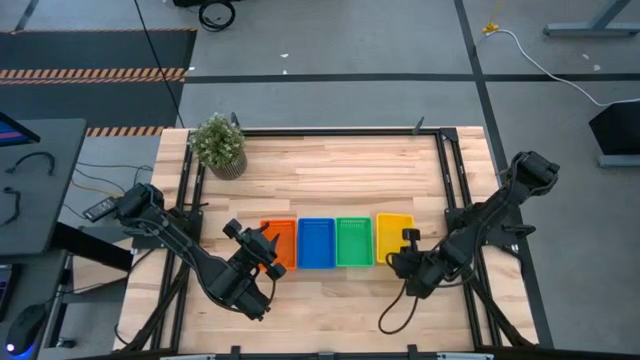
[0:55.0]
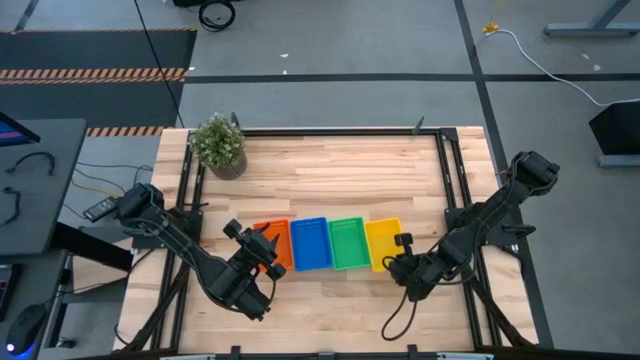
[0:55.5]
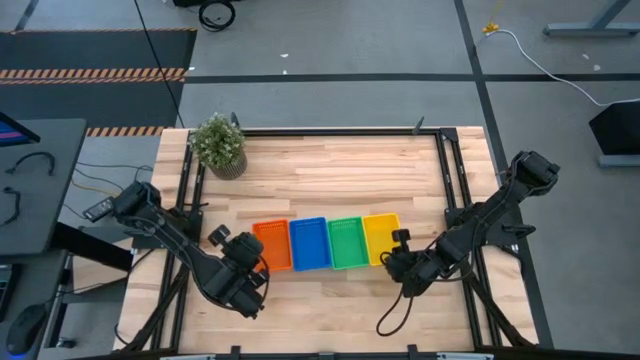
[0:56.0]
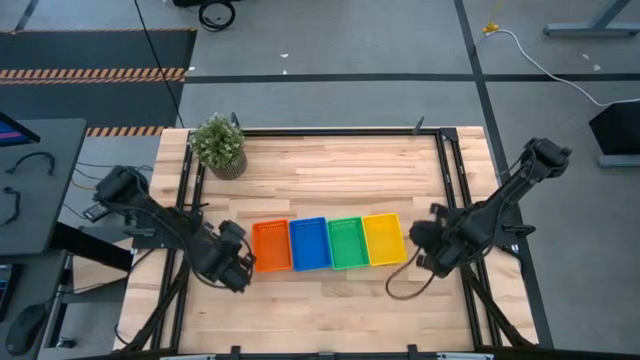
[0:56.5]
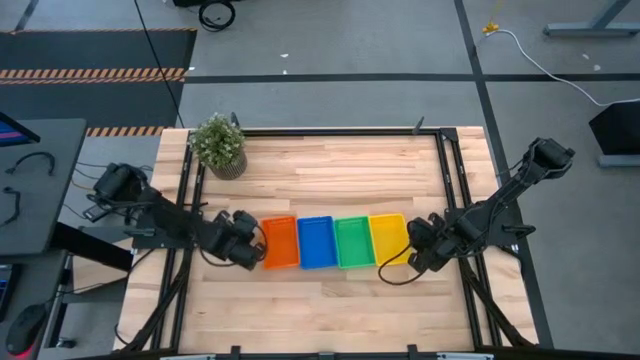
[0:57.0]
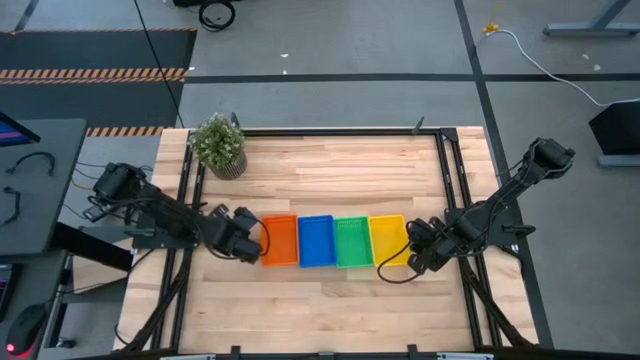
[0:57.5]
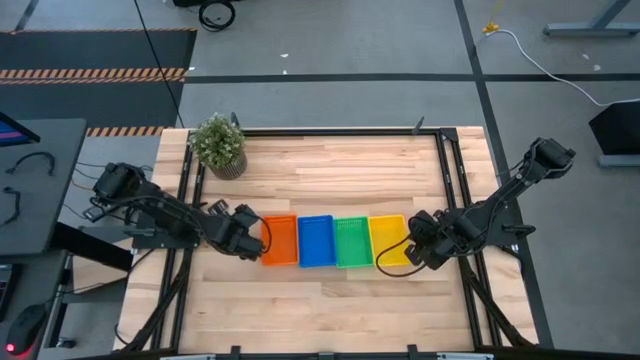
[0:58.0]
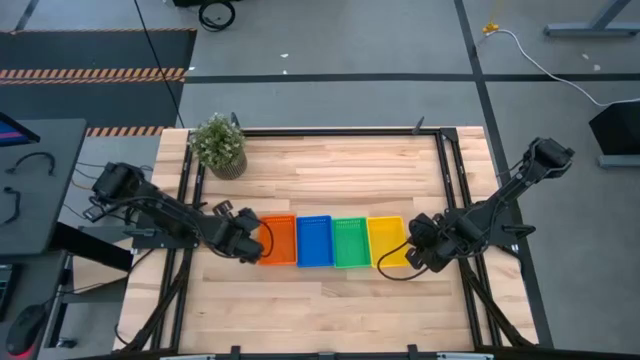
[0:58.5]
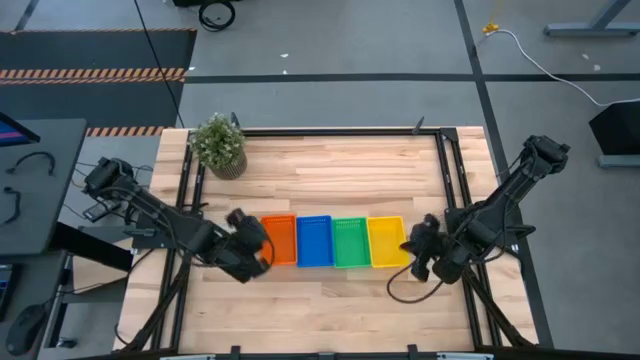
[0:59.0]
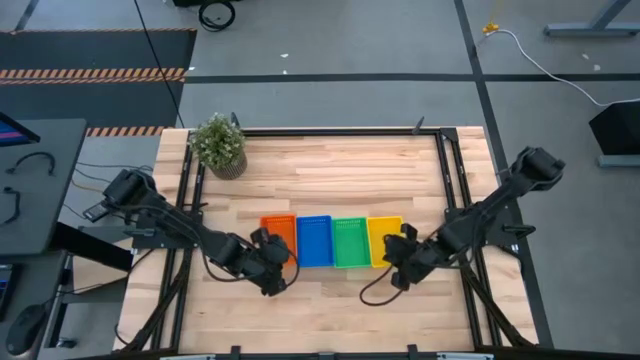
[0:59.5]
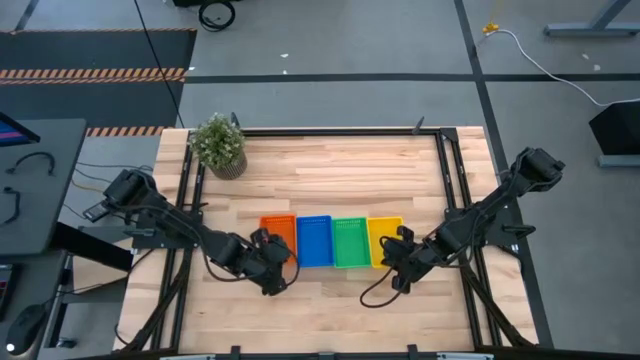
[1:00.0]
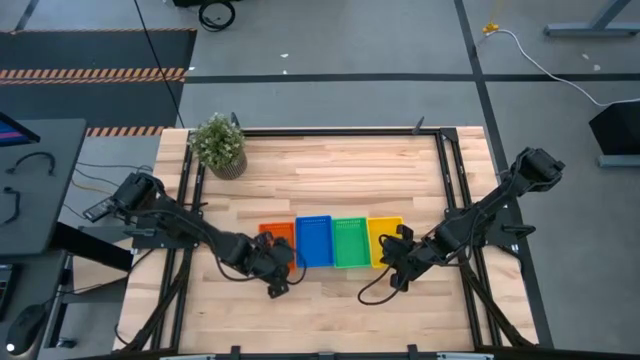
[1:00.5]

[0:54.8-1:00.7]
Adjust the bins

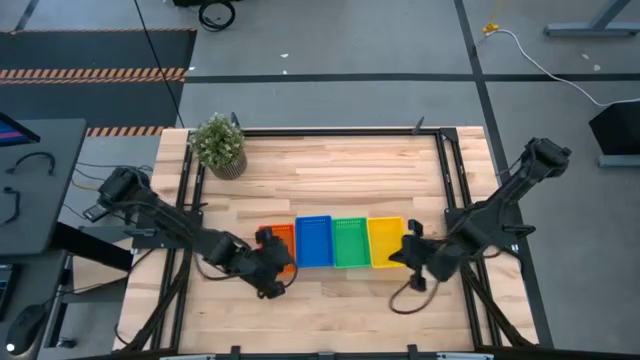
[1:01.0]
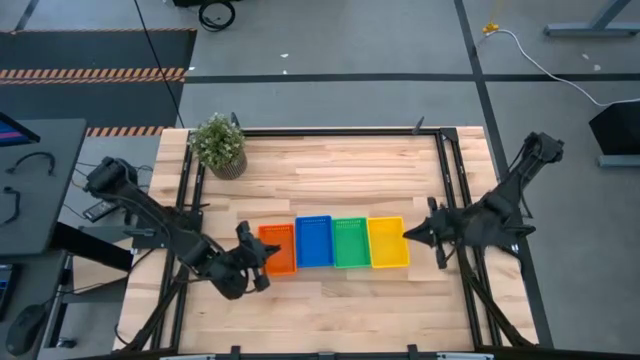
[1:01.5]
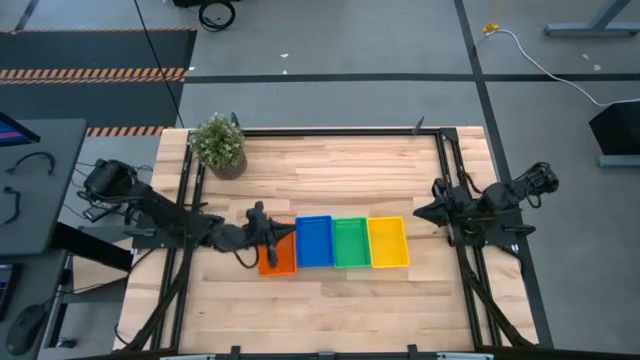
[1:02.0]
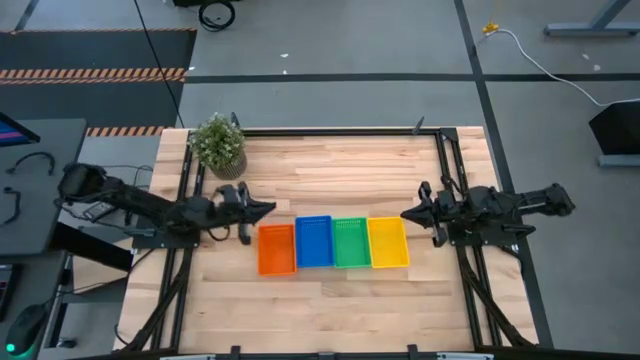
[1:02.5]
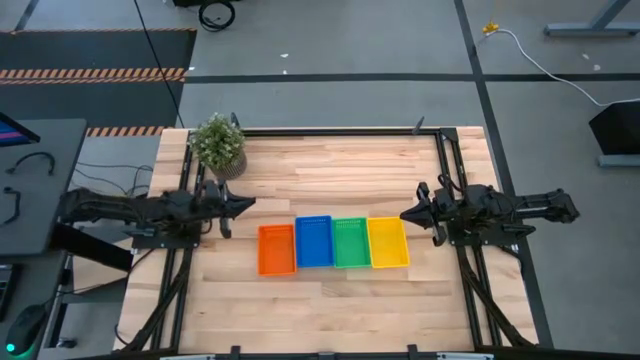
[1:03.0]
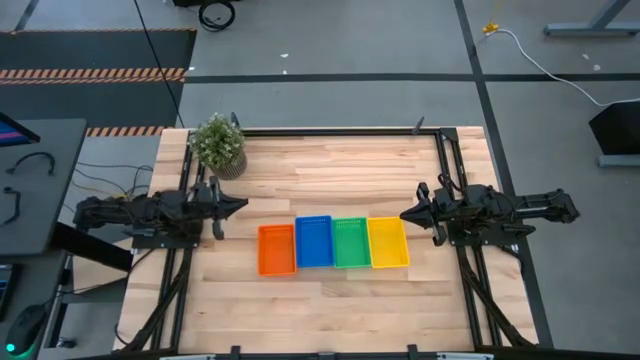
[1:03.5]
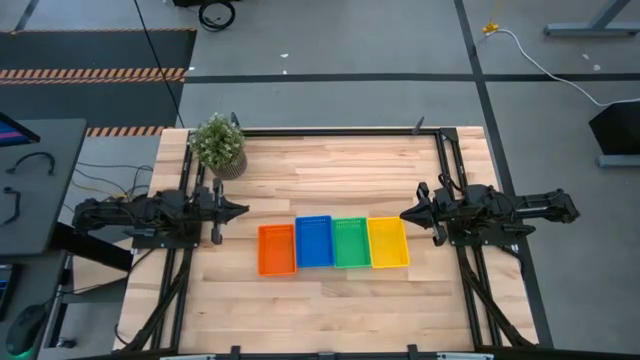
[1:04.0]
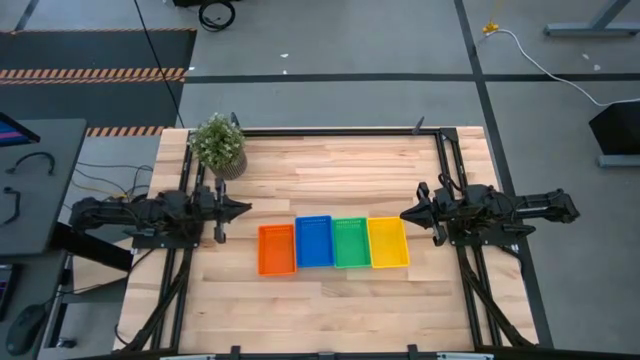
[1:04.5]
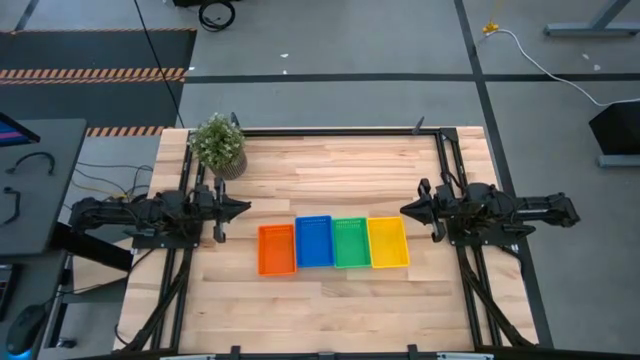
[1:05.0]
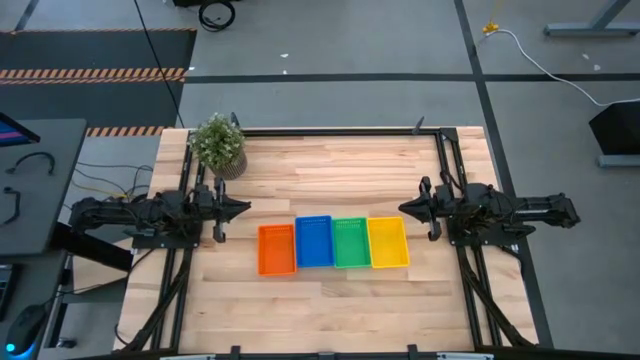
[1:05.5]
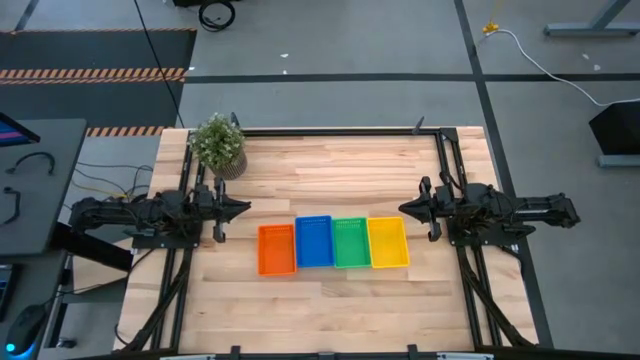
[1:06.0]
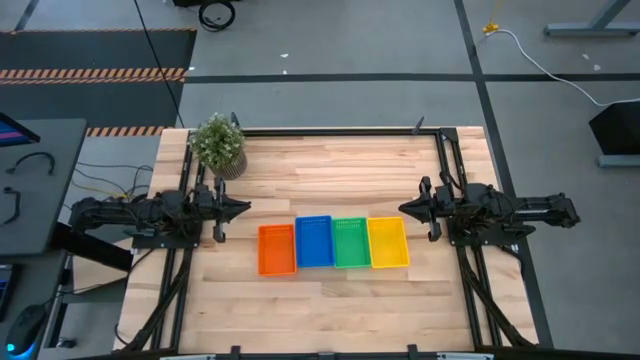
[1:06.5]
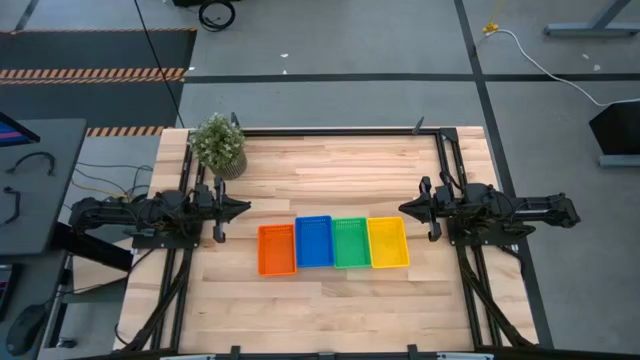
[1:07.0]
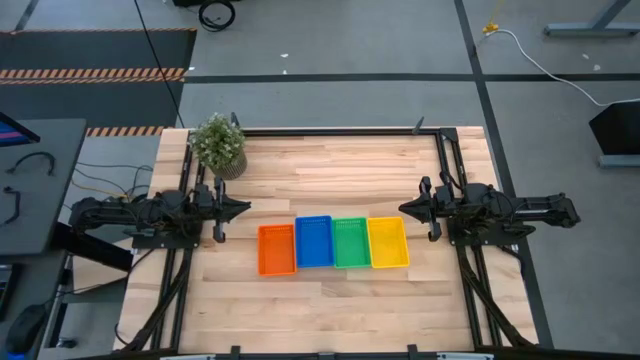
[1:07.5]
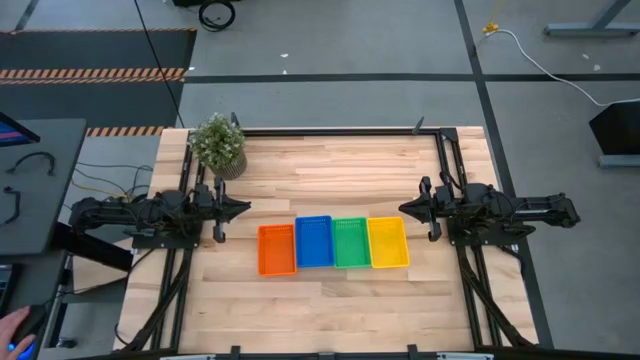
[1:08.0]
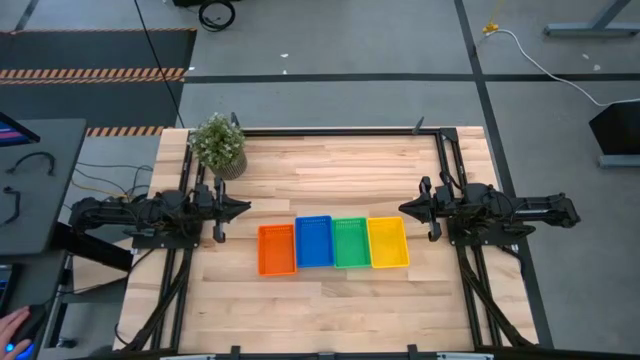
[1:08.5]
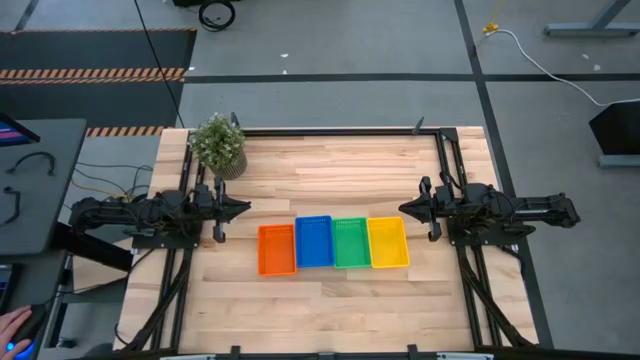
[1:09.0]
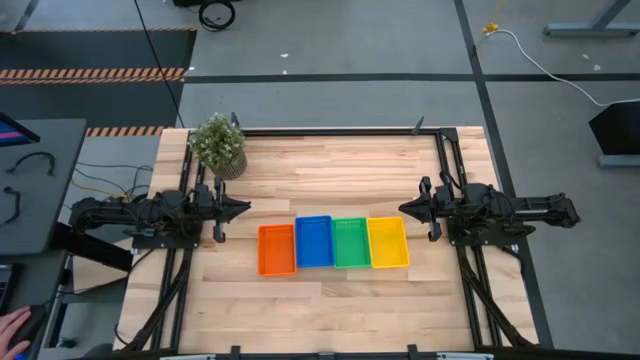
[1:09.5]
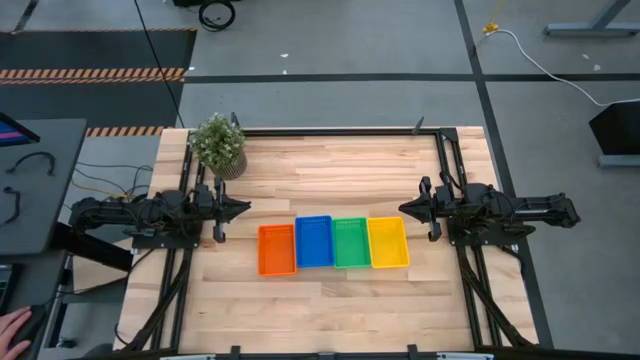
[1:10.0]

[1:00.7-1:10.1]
Return to Home Position

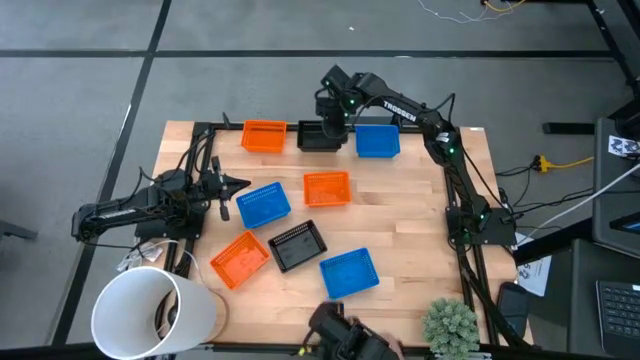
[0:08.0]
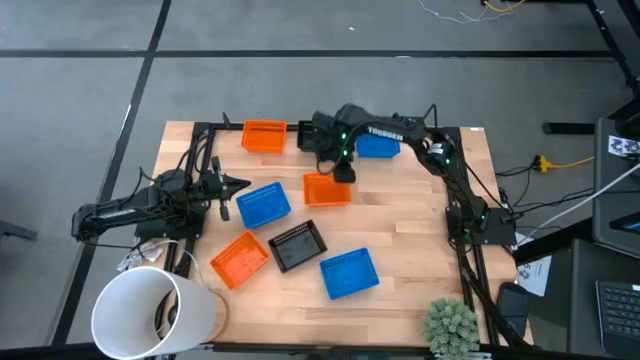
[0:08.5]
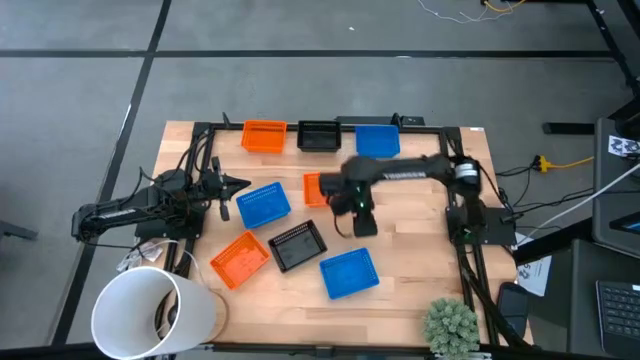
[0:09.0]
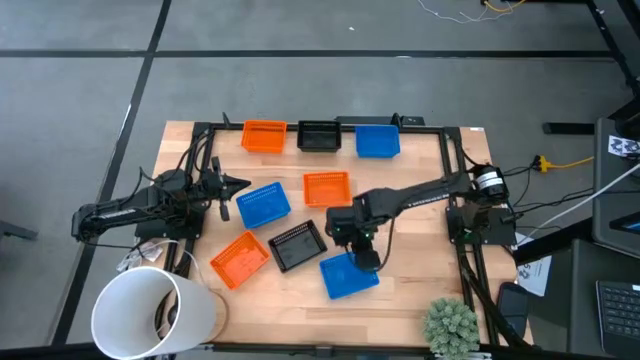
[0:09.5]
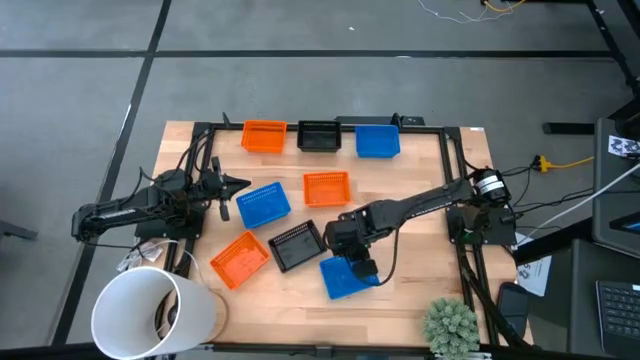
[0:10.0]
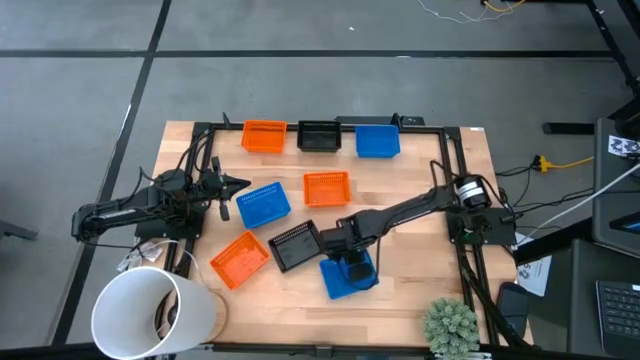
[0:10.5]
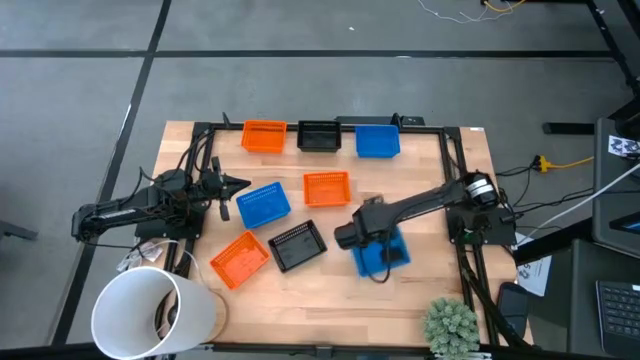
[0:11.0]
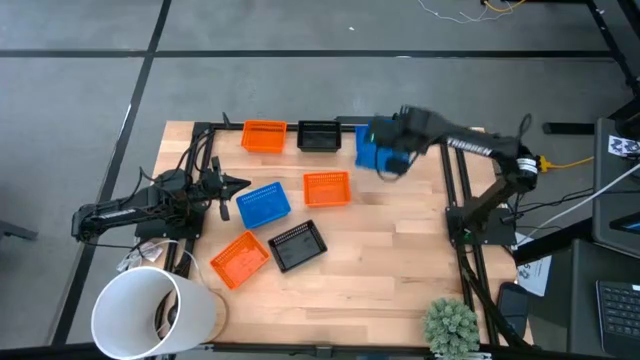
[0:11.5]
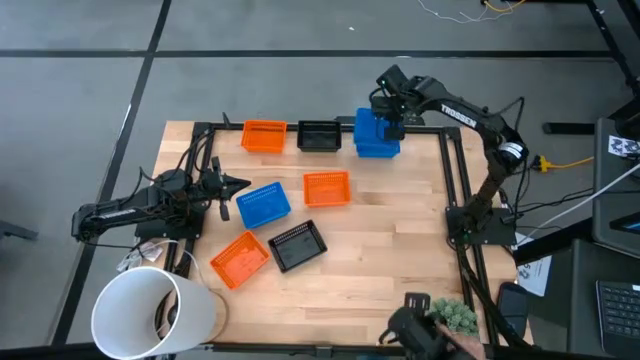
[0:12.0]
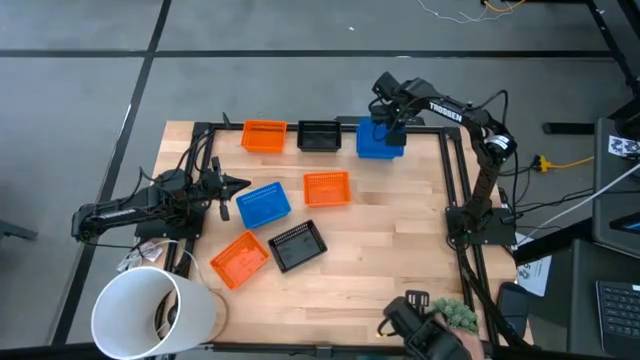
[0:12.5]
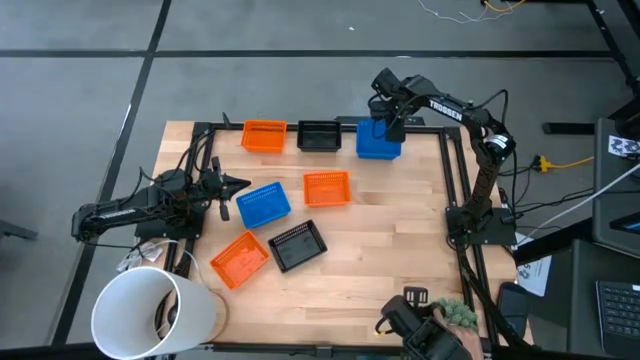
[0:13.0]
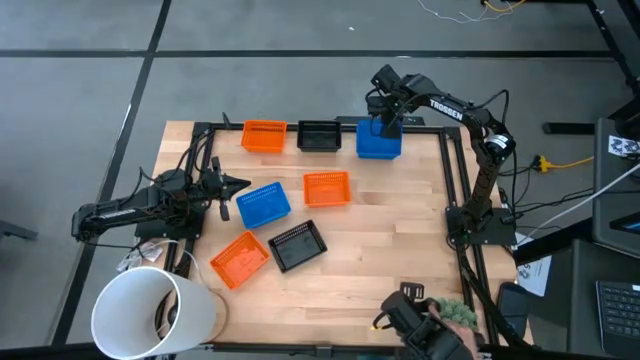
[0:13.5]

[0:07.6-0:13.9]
Stack the bottom blue basket on top of the other blue basket
